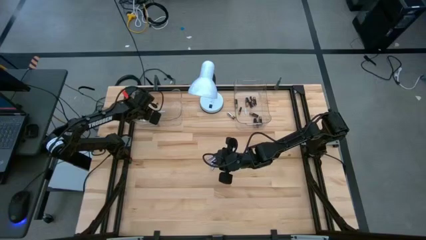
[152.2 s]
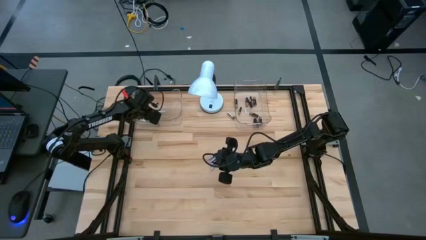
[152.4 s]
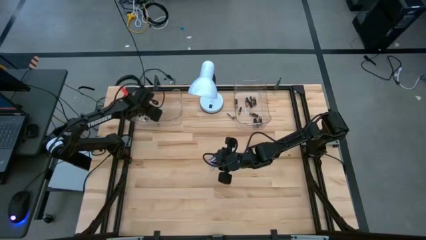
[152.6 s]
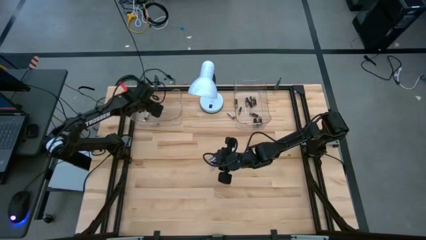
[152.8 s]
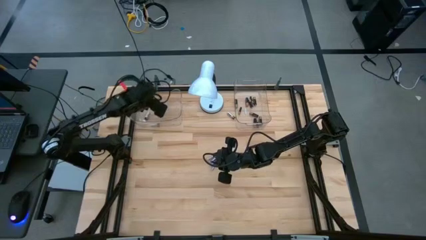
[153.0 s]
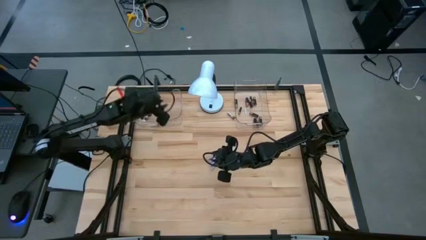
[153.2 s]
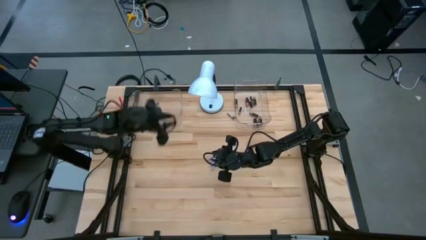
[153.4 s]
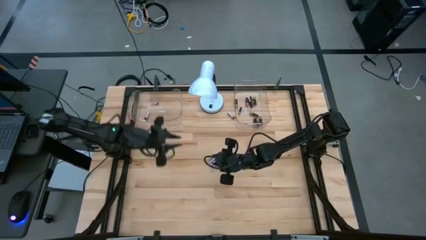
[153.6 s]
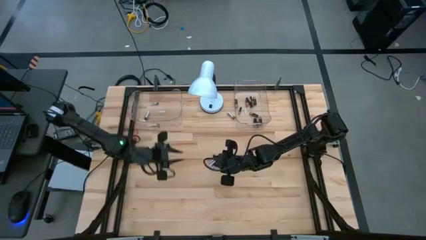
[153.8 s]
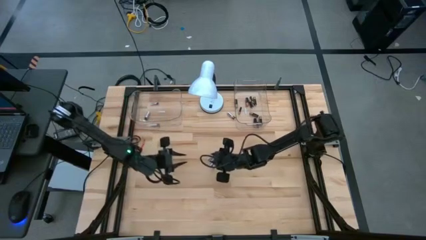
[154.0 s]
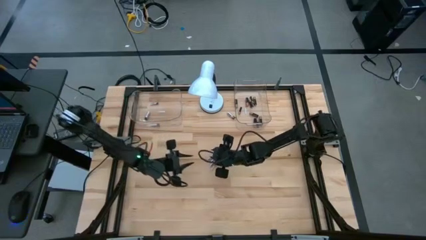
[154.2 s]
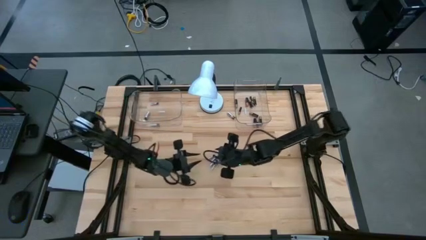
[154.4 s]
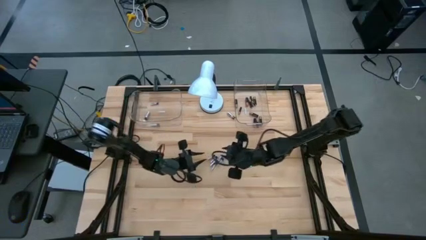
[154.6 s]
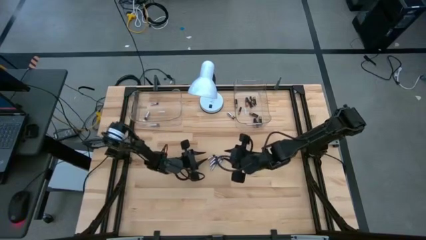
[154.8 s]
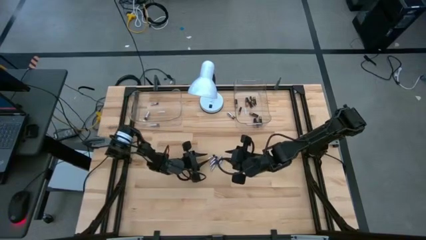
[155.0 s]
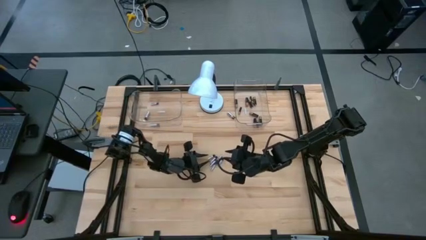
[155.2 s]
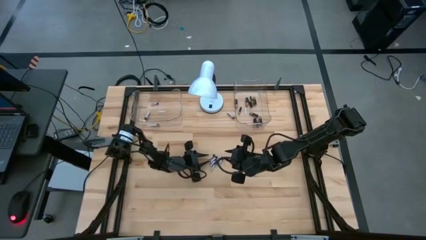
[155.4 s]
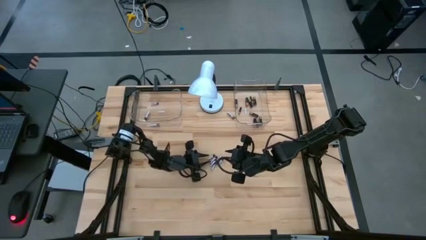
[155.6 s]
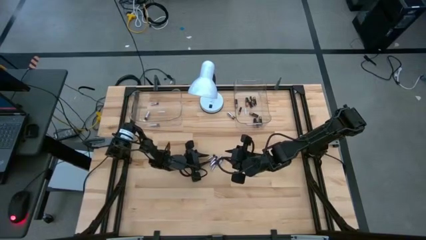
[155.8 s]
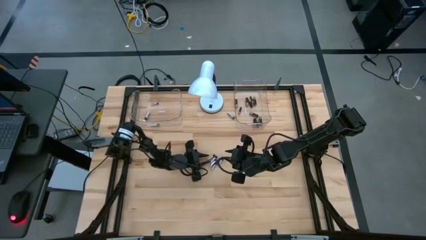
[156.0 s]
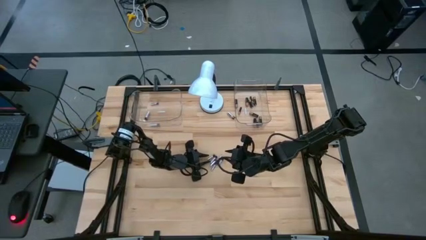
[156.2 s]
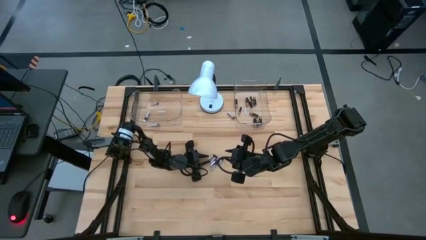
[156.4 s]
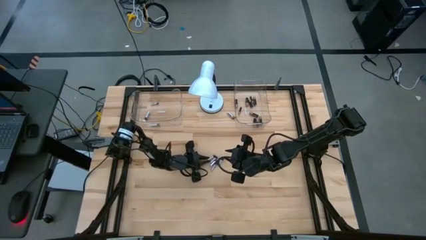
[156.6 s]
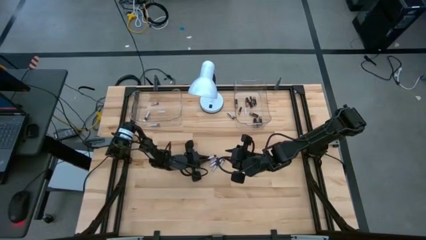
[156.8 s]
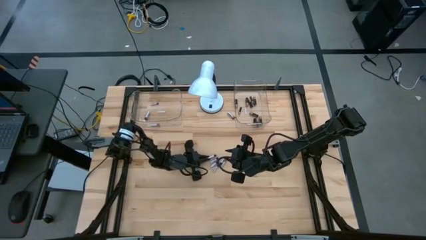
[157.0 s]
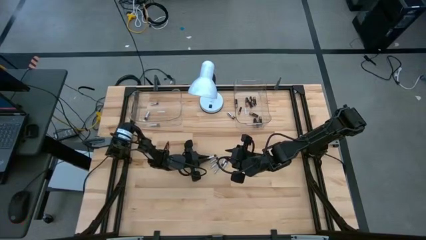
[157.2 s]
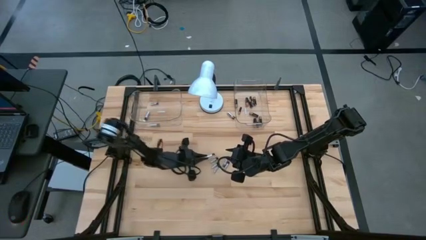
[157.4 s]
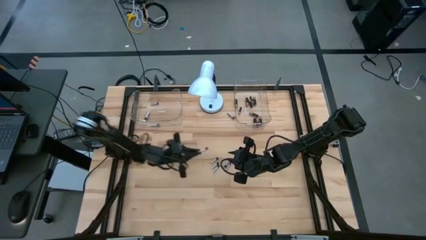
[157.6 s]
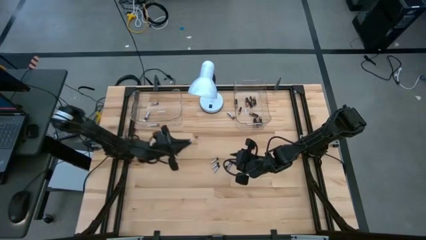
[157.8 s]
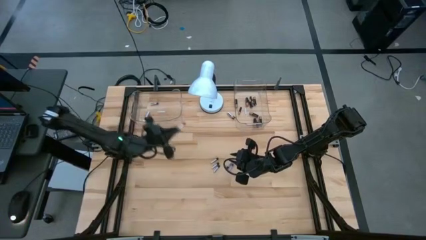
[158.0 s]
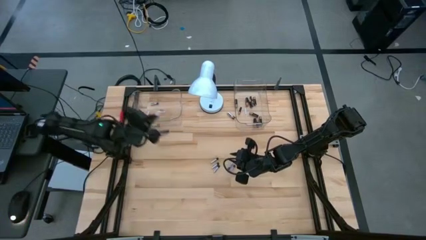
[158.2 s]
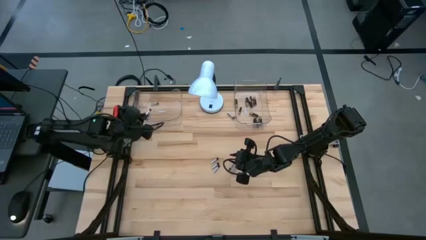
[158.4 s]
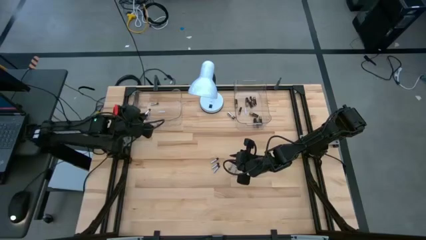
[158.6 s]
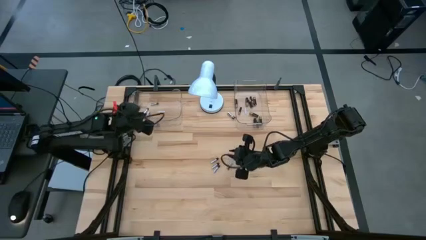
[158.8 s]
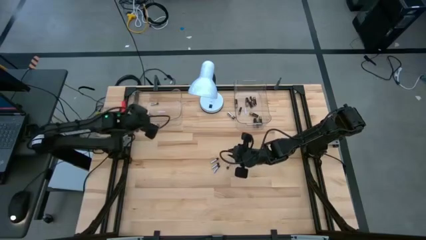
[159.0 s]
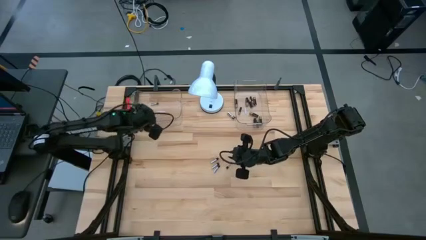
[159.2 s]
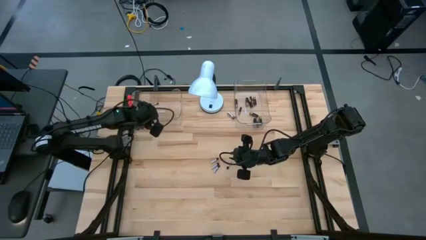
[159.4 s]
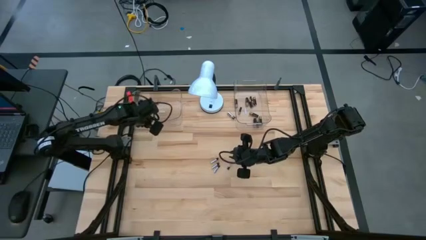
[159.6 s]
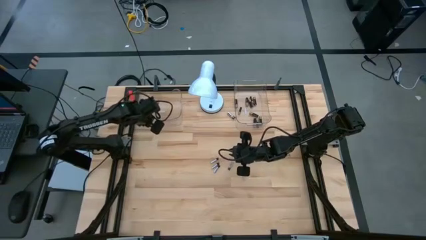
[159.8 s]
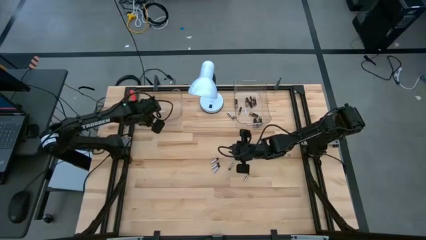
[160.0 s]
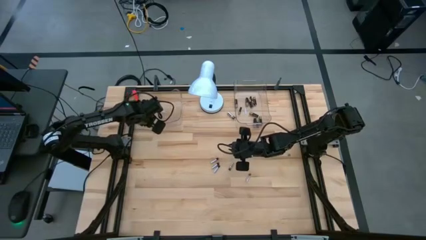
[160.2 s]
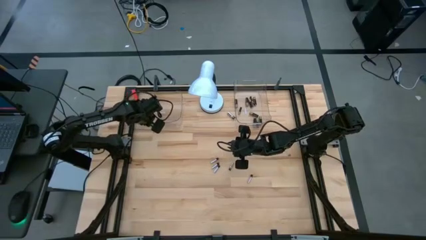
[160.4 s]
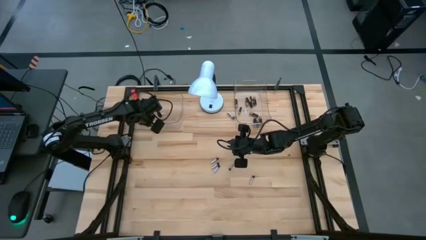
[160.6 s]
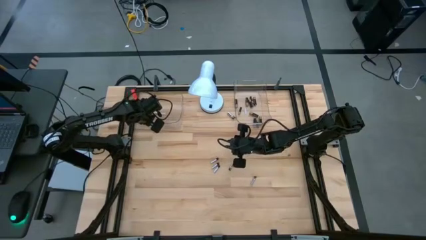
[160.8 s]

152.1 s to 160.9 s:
Task: Sort batteries
Put the silver battery in the transparent bin

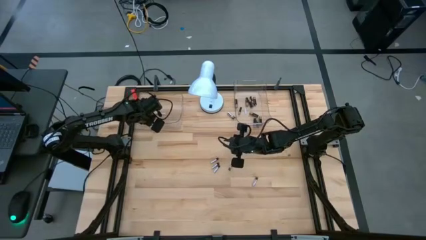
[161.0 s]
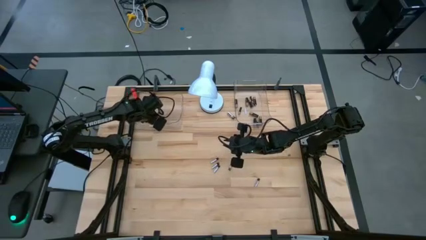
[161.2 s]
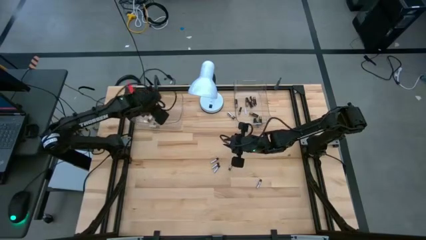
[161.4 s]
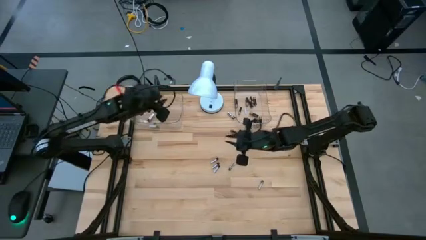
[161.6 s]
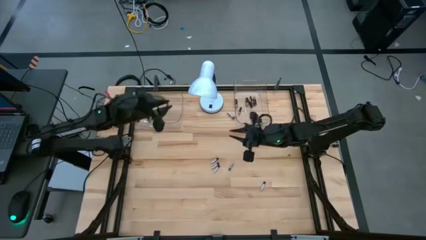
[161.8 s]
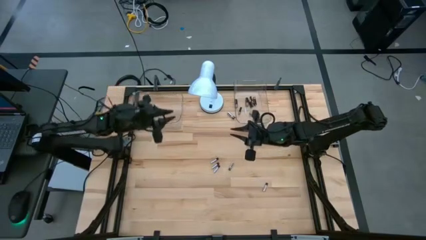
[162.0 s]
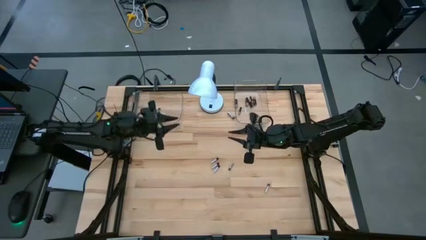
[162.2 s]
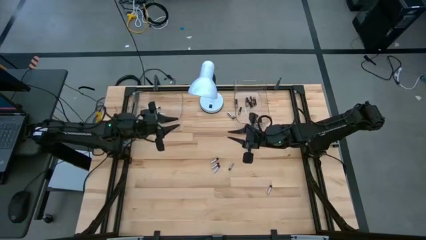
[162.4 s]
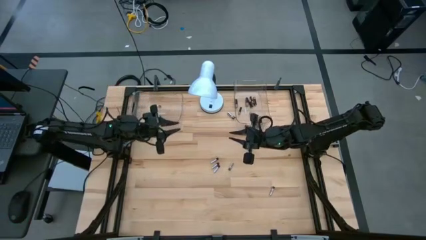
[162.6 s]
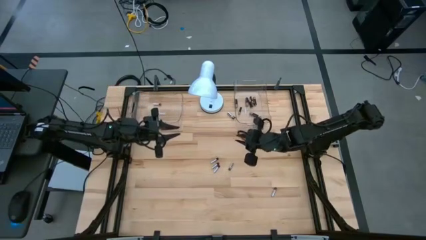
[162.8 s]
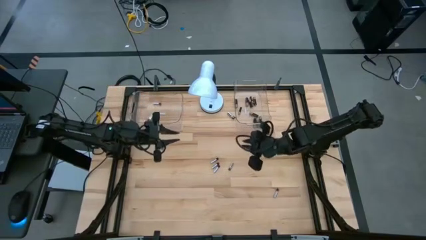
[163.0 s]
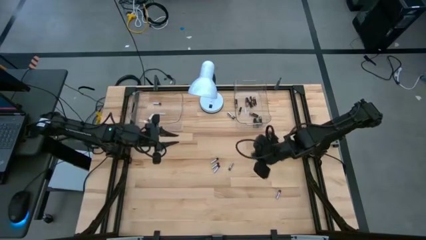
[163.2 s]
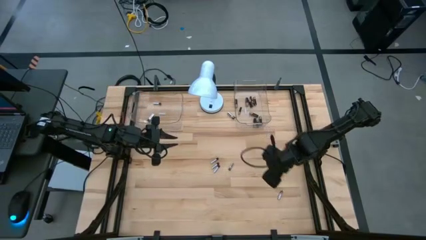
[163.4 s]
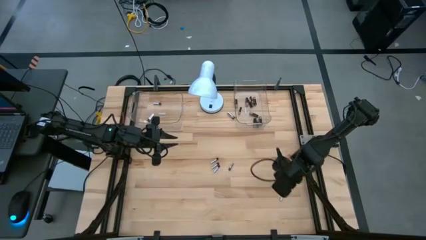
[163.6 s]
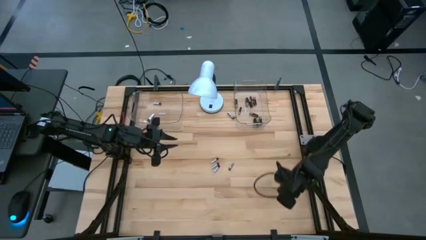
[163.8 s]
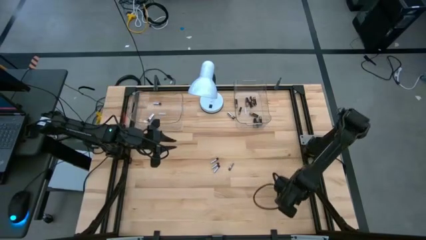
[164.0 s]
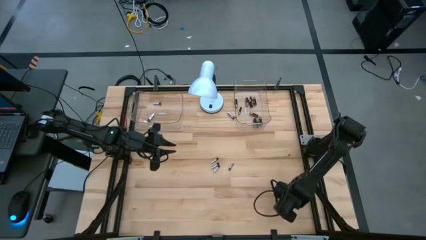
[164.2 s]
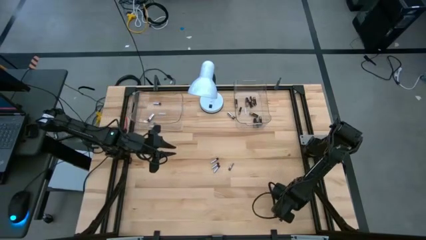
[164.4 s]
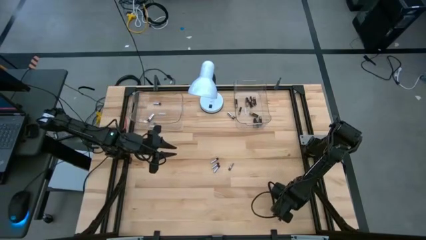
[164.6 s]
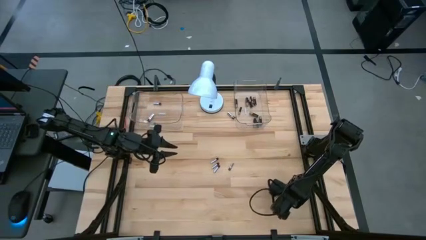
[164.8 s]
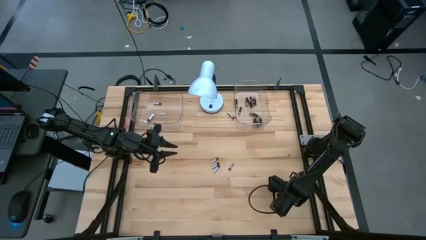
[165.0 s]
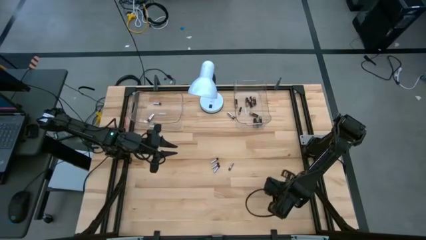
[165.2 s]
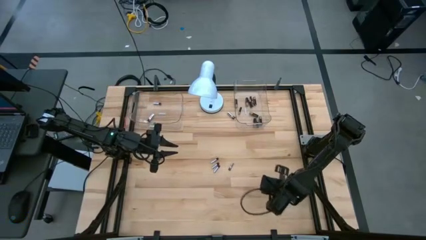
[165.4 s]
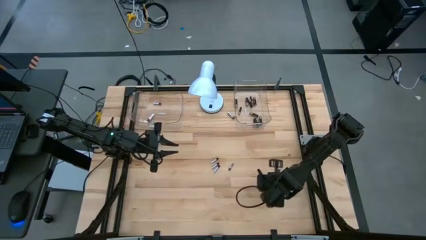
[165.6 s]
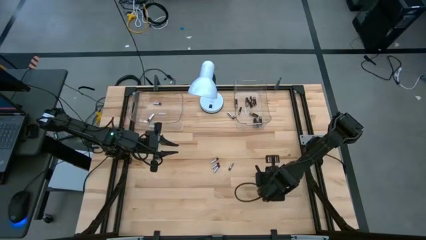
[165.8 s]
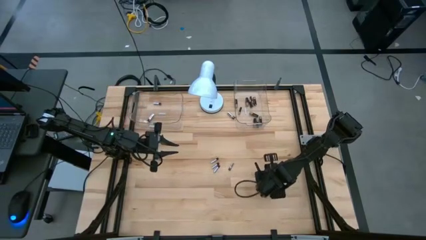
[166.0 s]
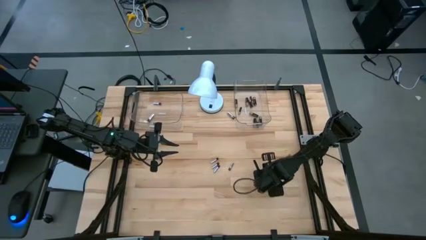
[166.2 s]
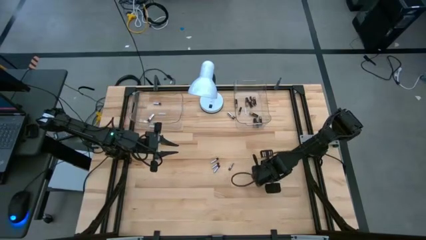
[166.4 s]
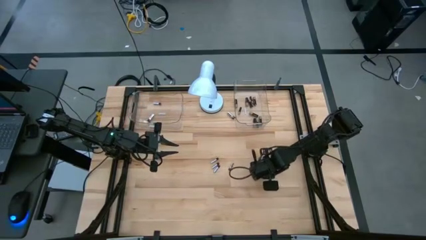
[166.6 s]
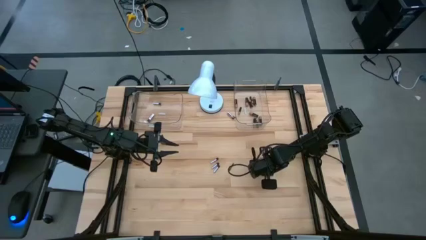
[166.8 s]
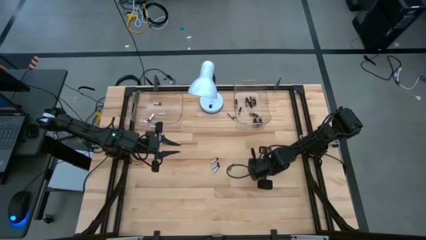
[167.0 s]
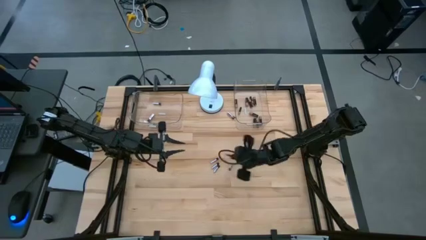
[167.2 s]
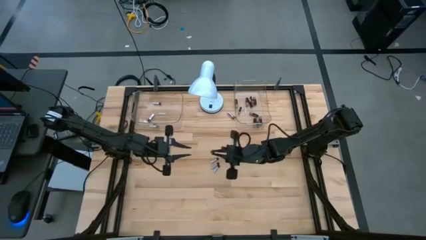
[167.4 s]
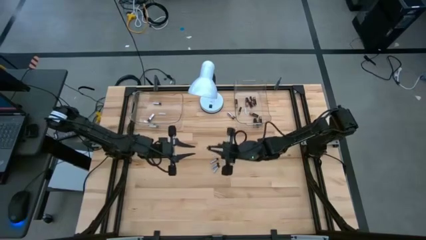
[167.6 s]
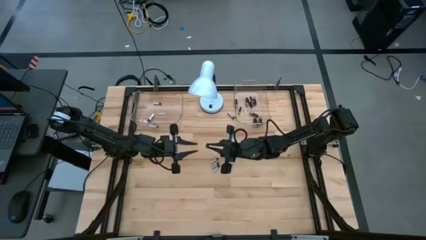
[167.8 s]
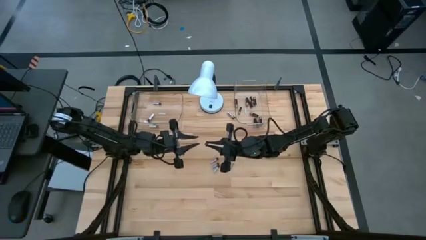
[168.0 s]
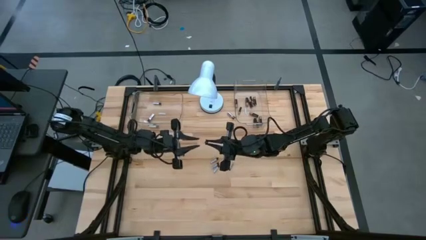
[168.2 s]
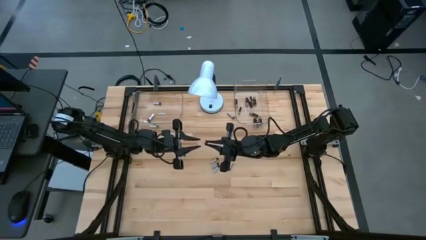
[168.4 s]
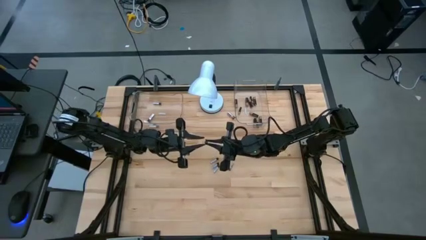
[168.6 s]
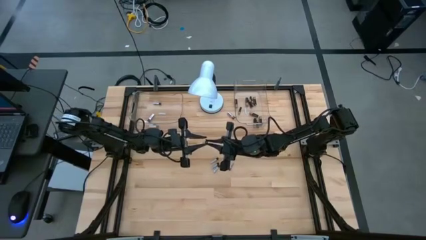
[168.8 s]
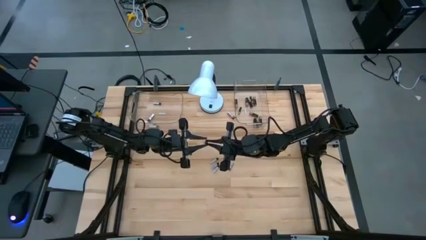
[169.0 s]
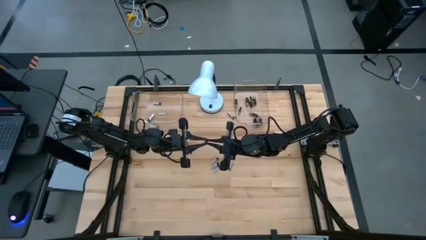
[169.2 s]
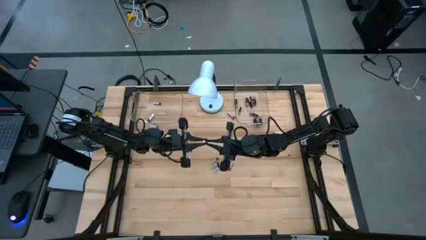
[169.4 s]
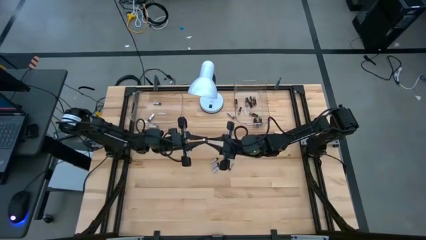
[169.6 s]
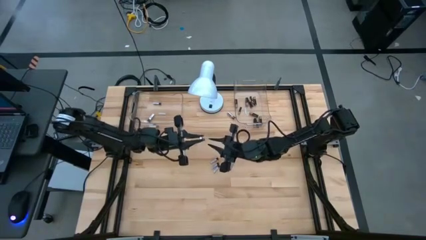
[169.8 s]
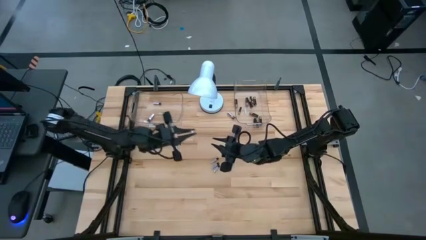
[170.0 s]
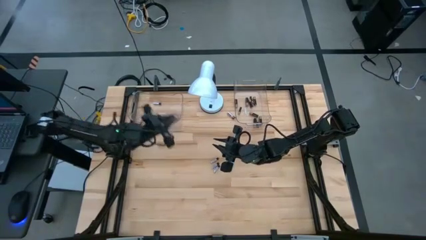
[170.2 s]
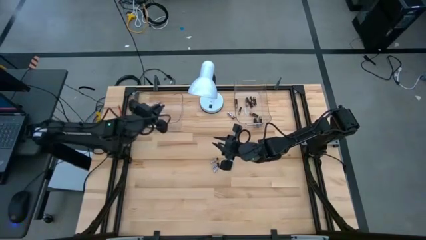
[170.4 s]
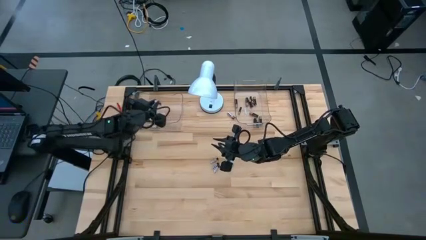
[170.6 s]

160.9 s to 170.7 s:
Put the silver battery in the transparent bin
